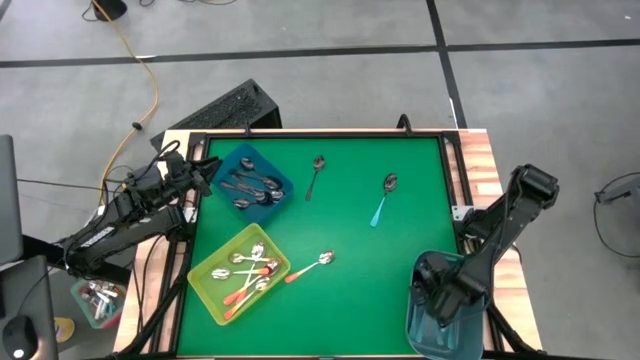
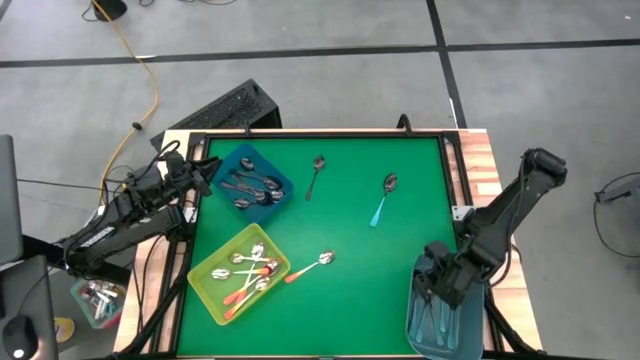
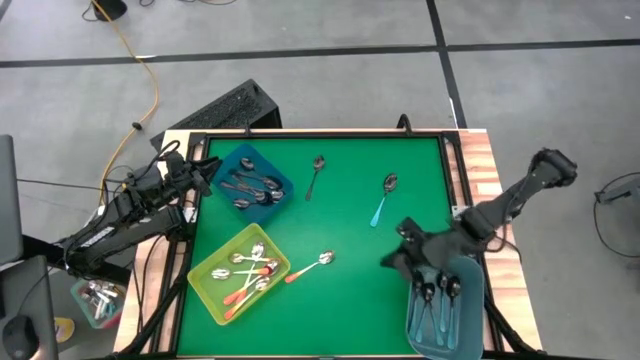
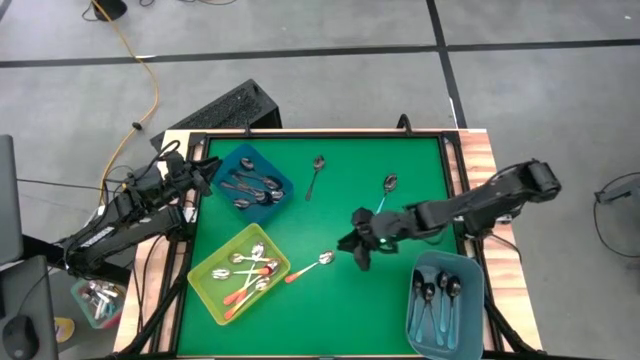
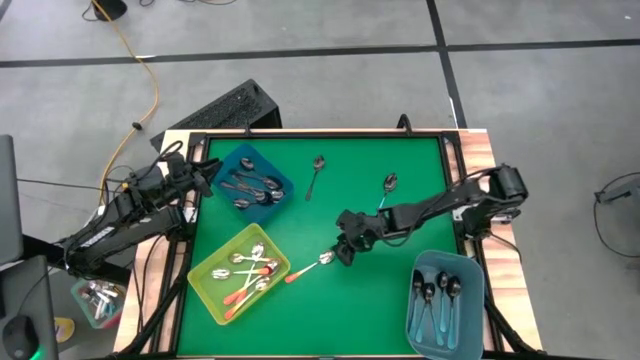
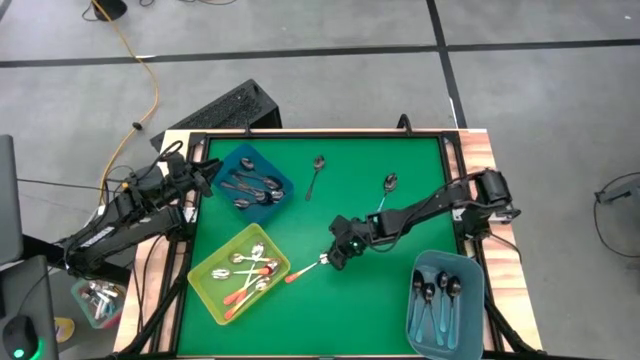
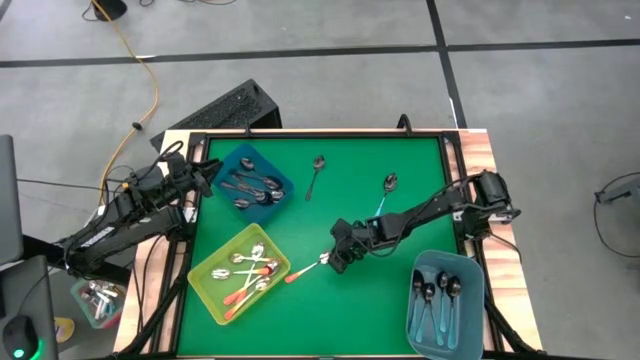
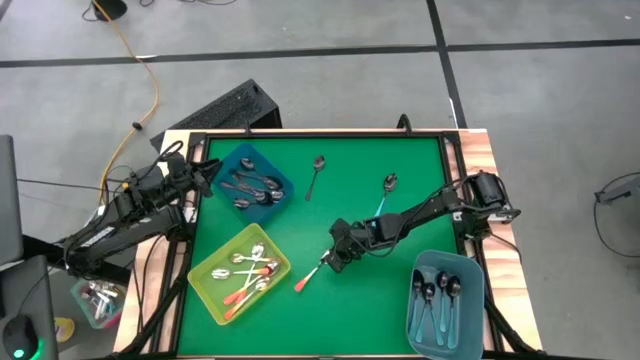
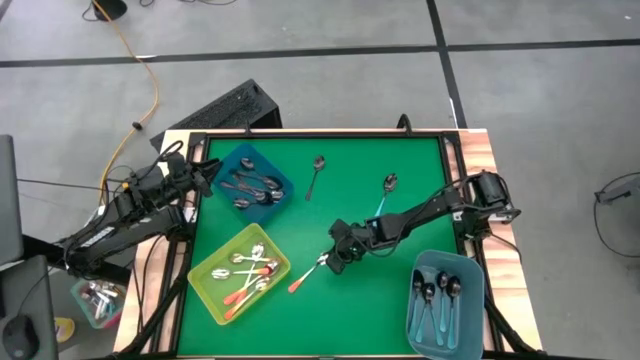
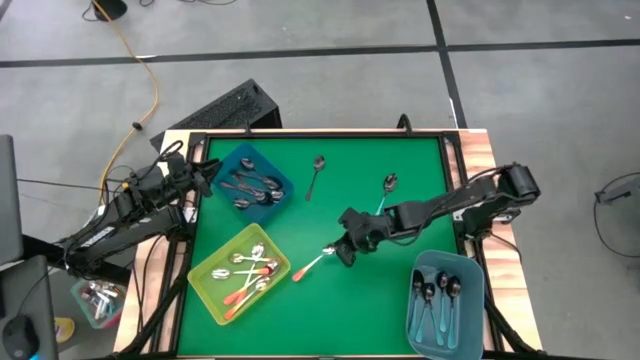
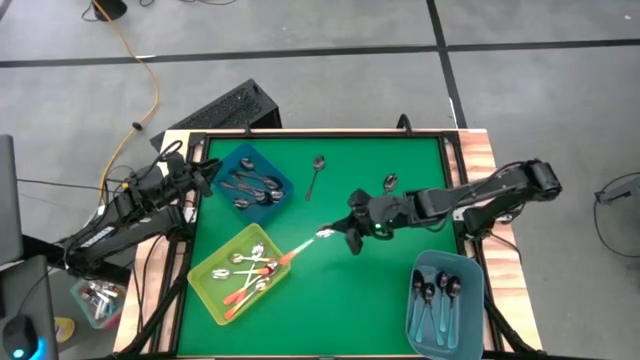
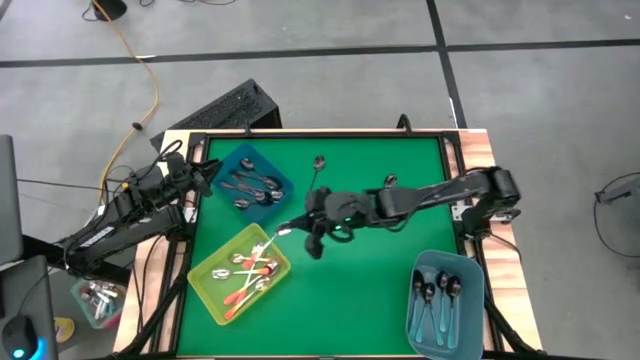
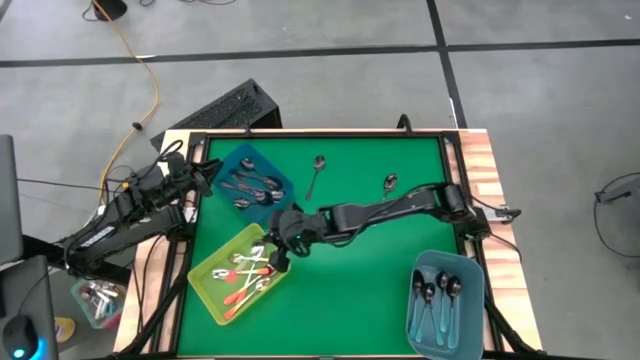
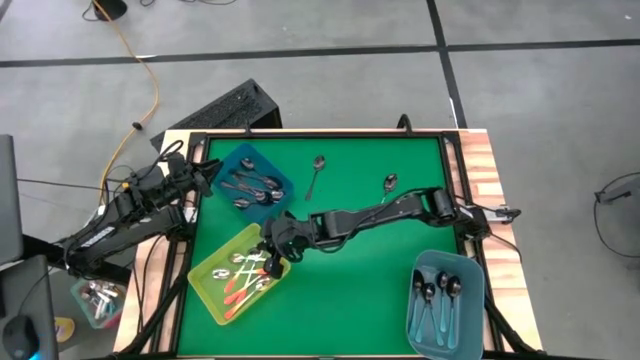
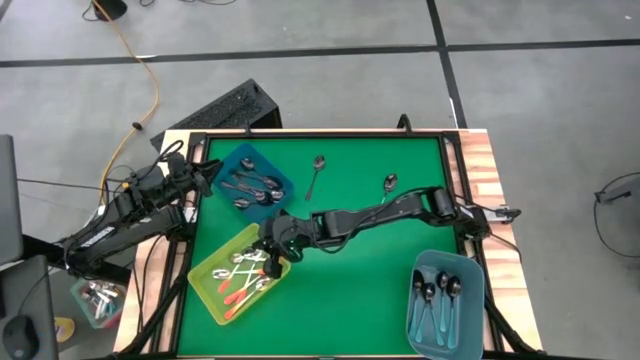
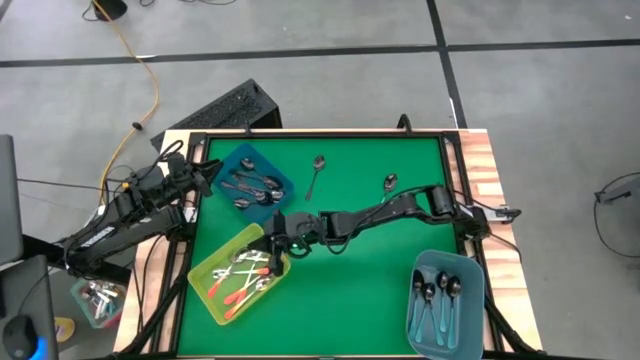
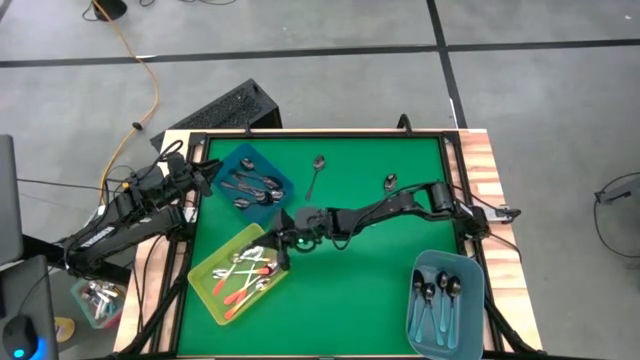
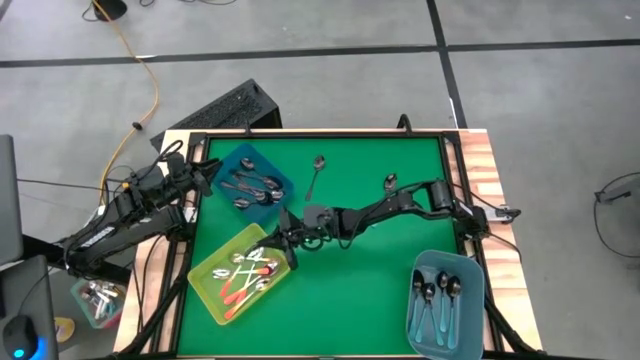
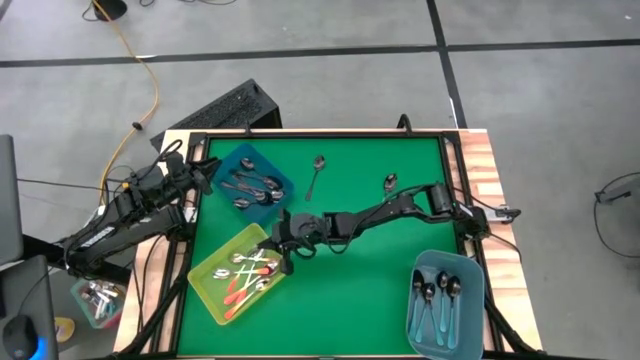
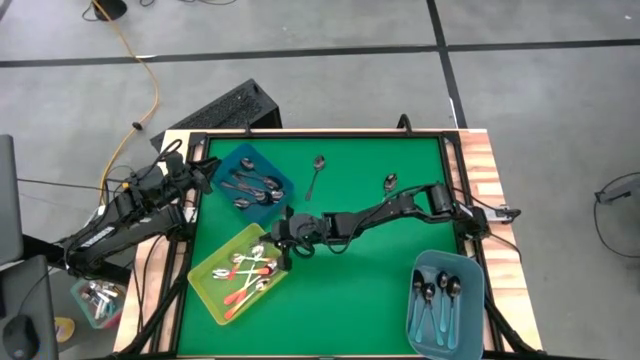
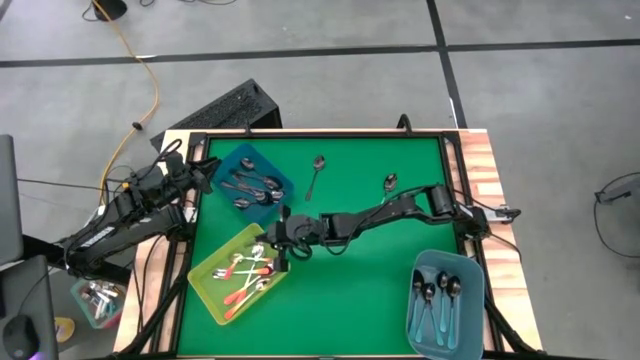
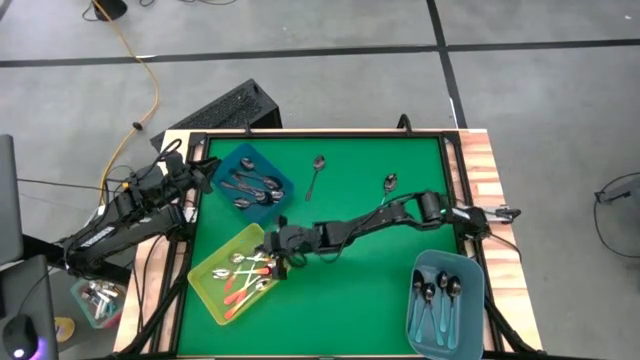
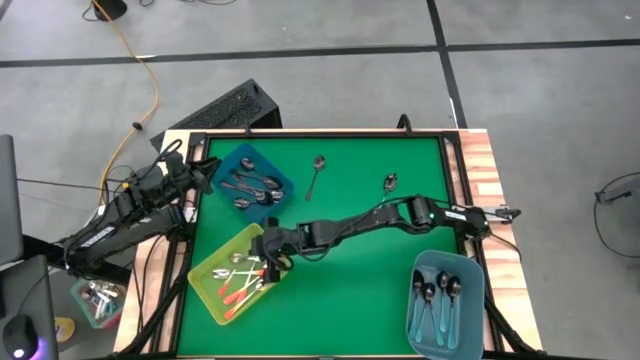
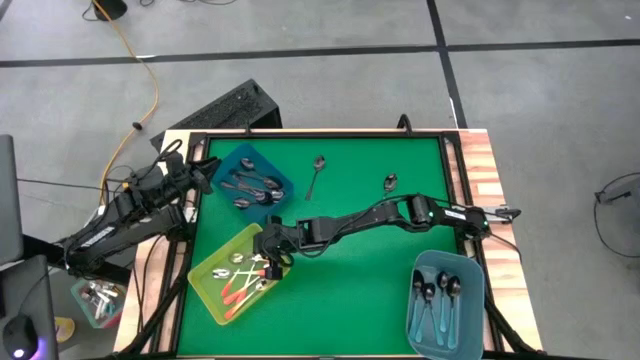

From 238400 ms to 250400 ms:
Task: Sort silverware by color (type)
Put the orange spoon into the green bin

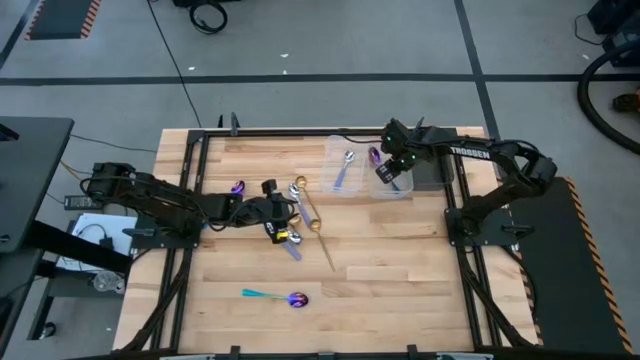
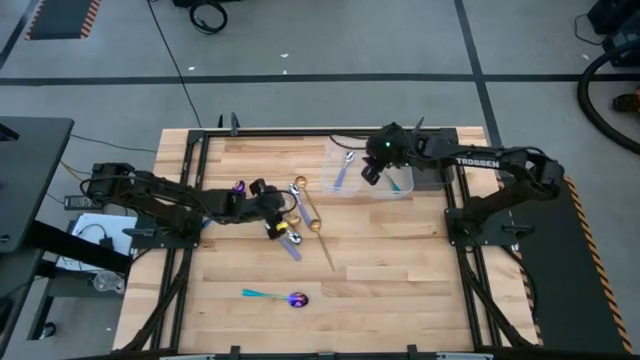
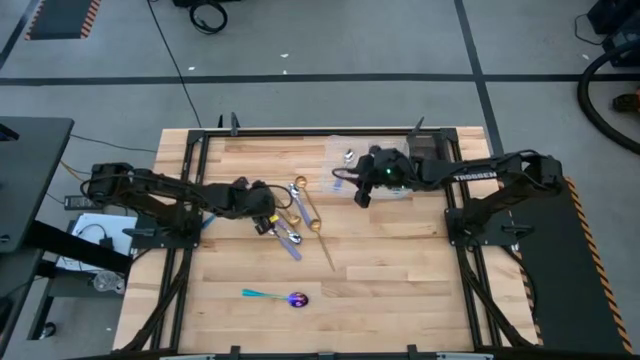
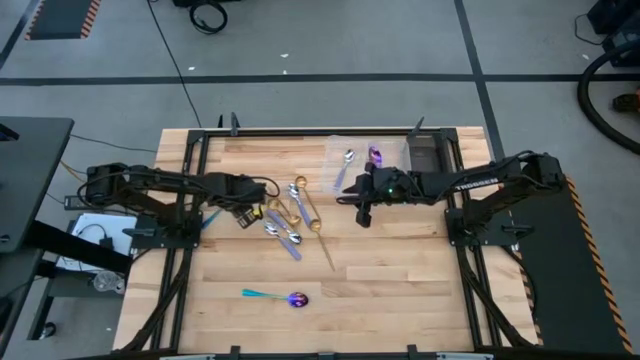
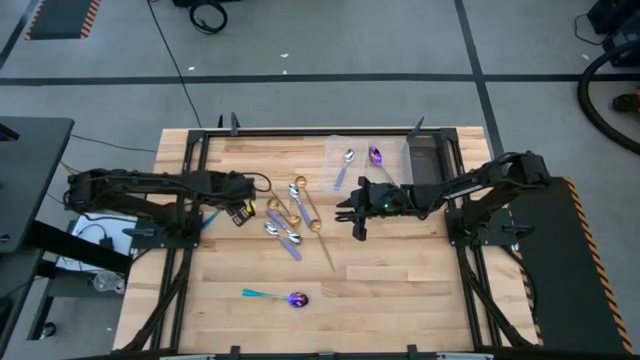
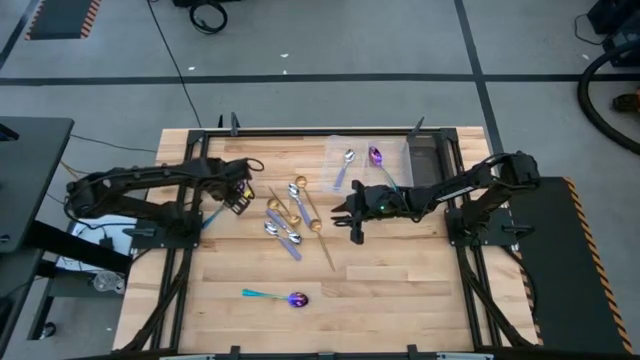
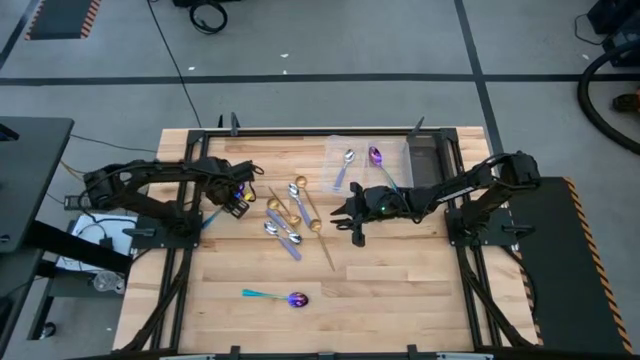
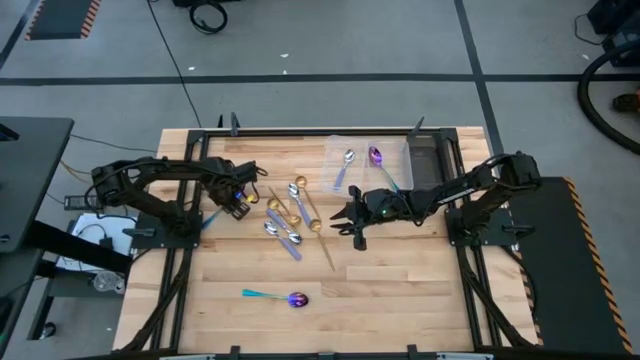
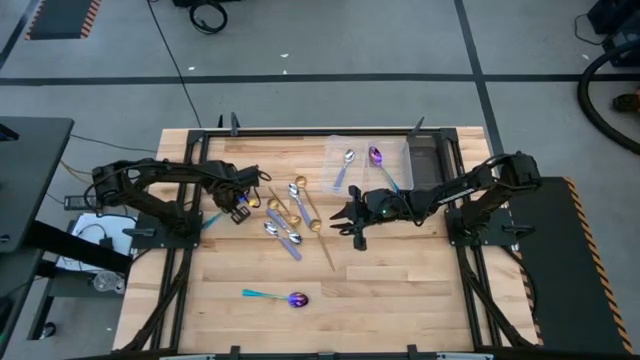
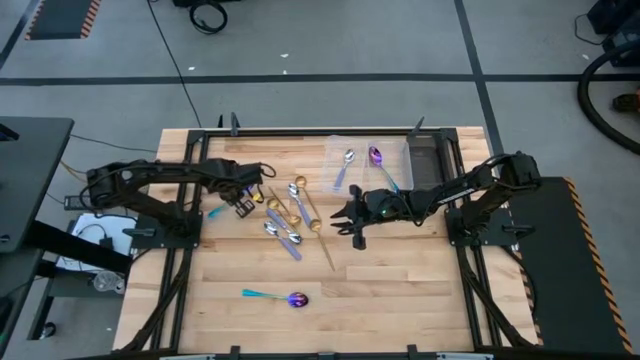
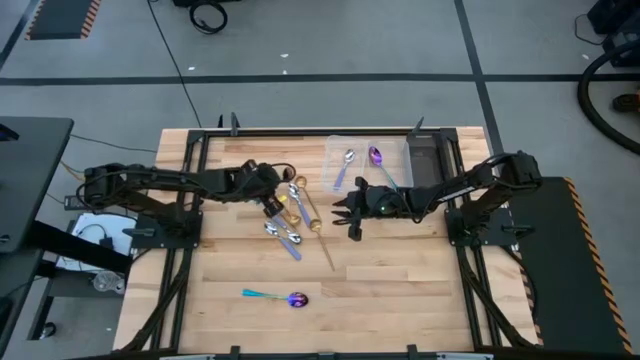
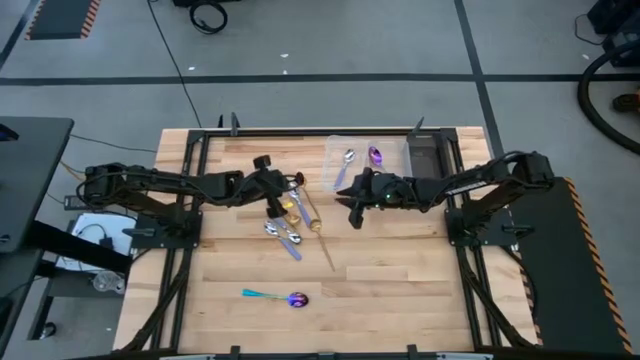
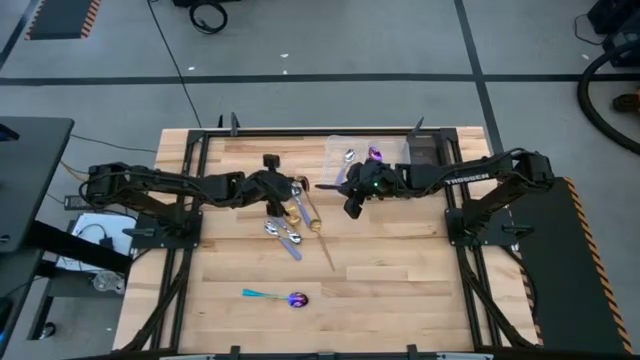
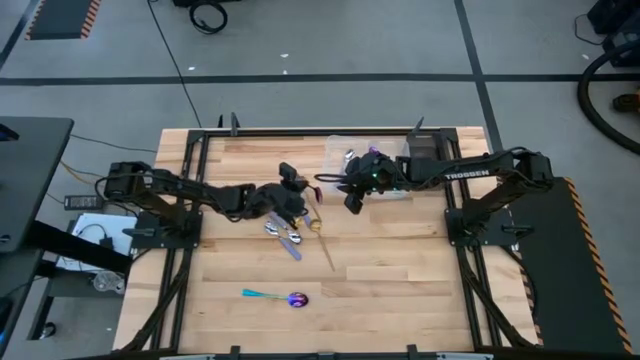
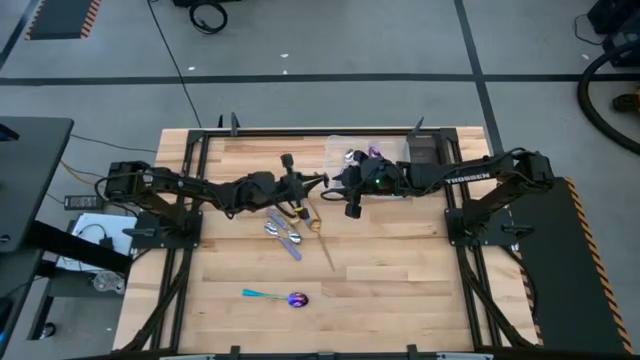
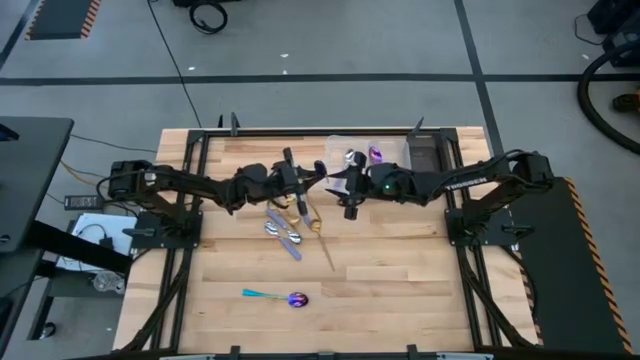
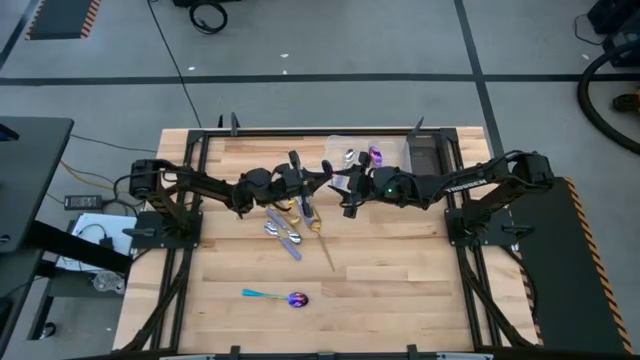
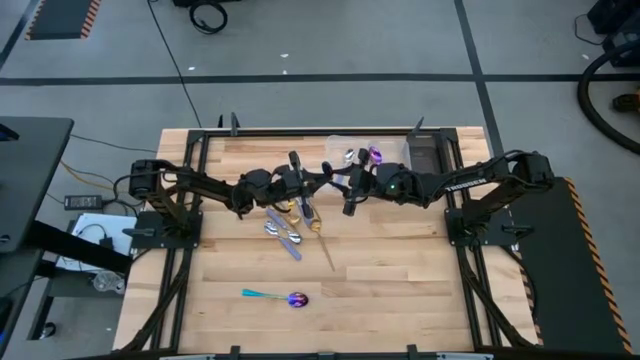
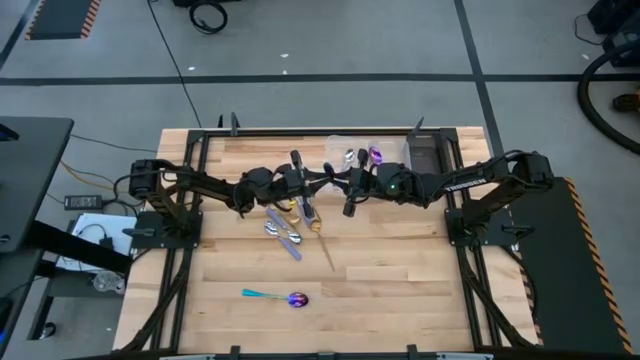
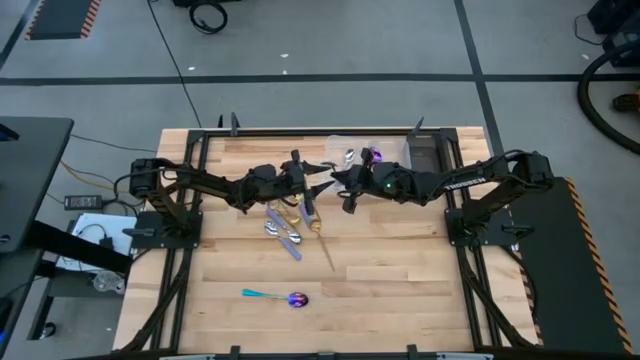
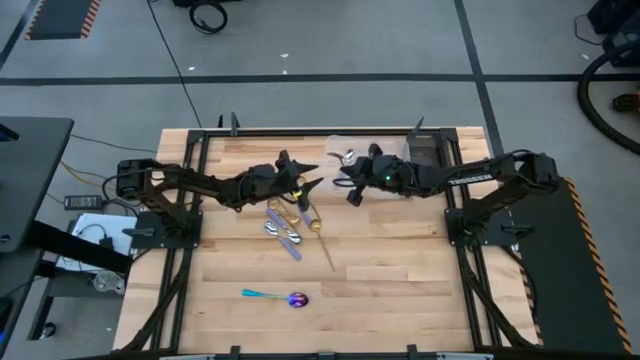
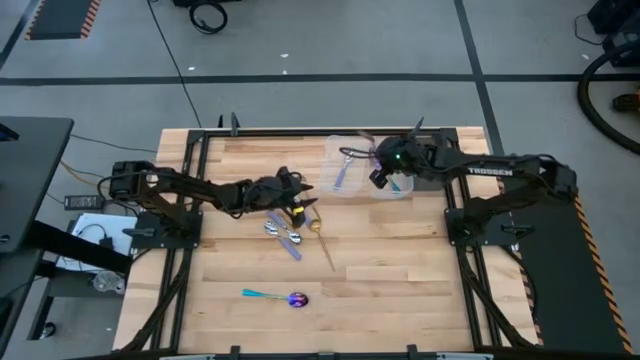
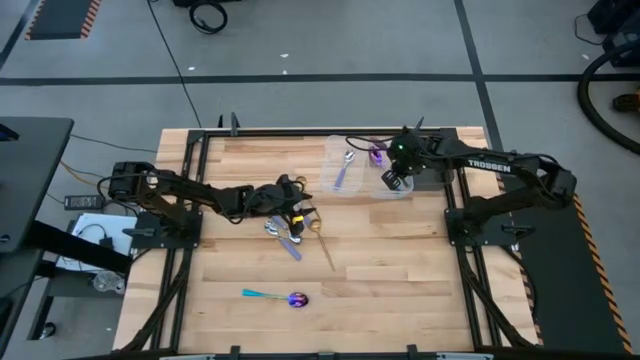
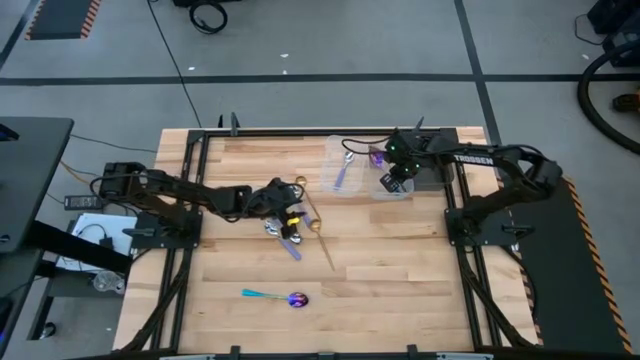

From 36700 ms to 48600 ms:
Task: Sort silverware by color (type)
Put the top purple spoon into the right transparent bin
